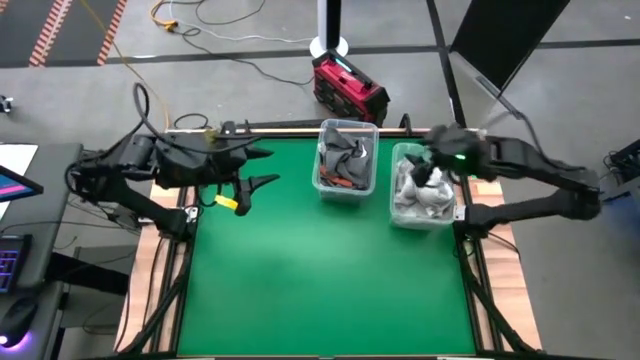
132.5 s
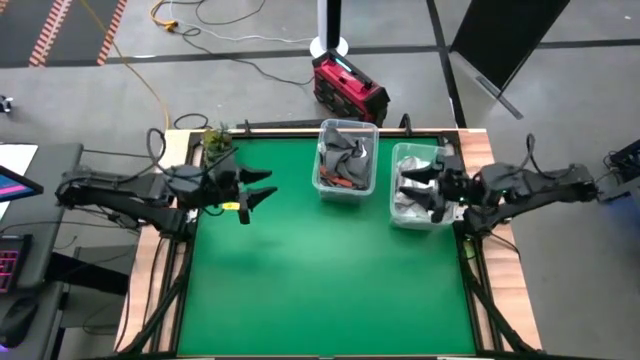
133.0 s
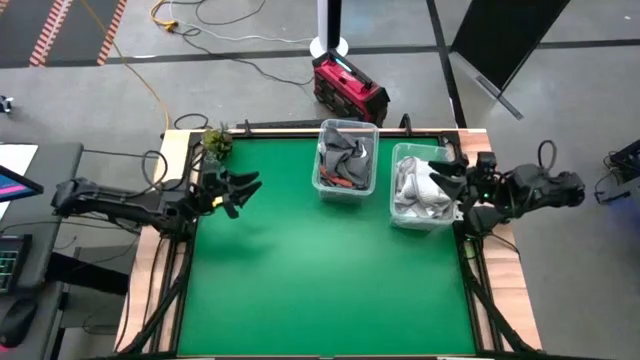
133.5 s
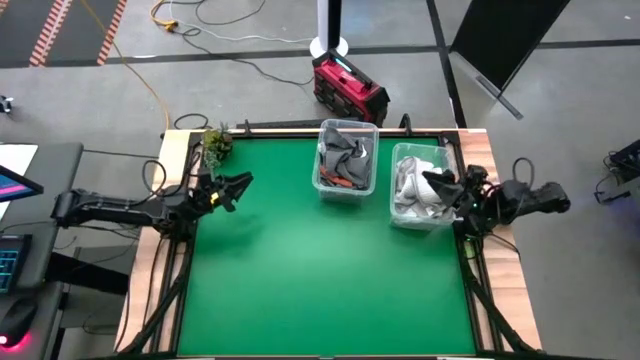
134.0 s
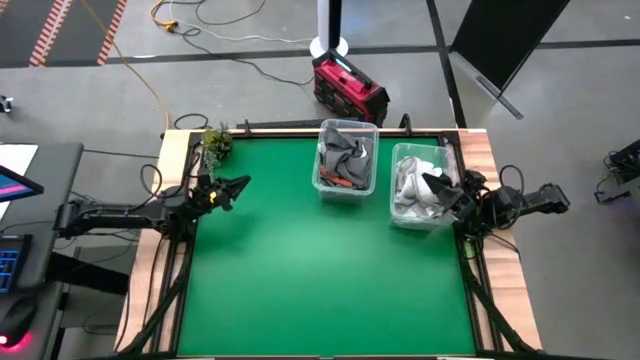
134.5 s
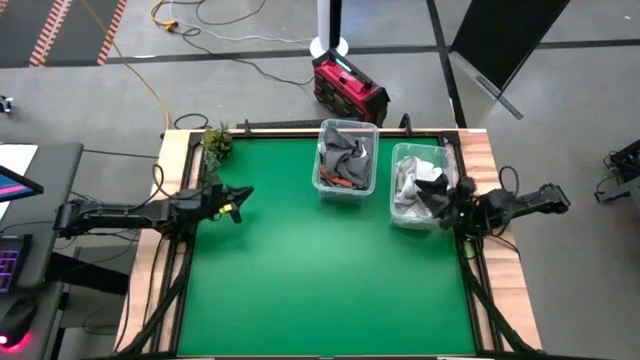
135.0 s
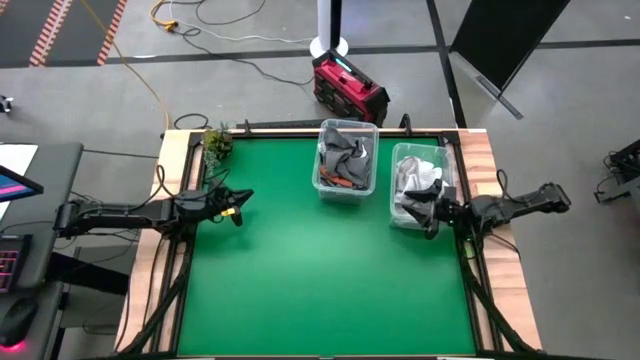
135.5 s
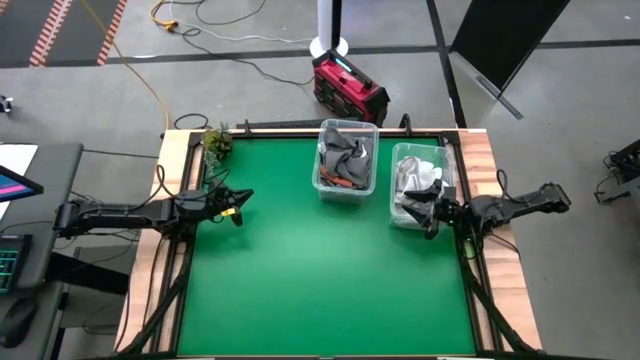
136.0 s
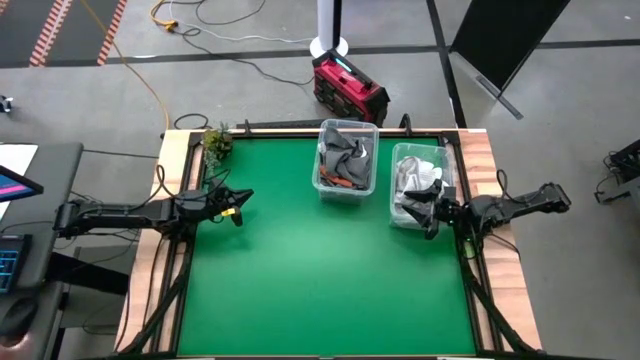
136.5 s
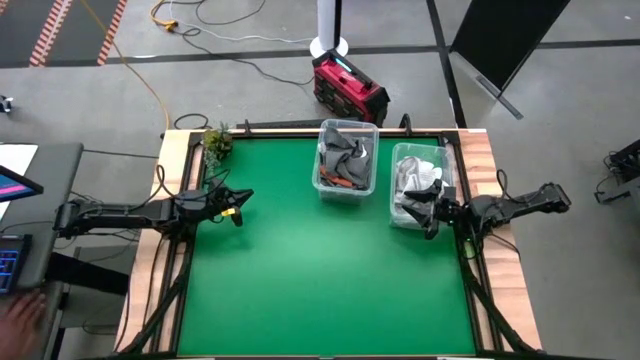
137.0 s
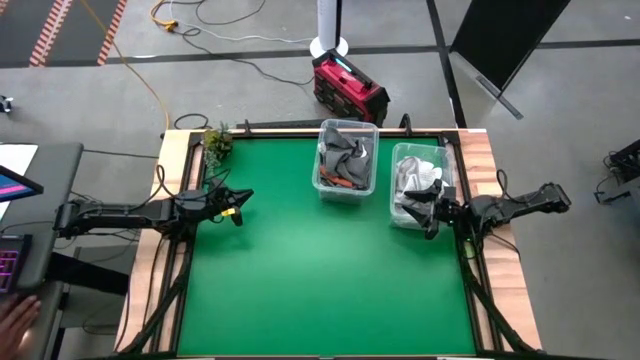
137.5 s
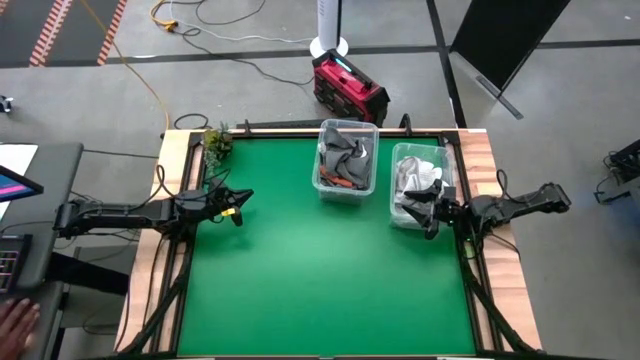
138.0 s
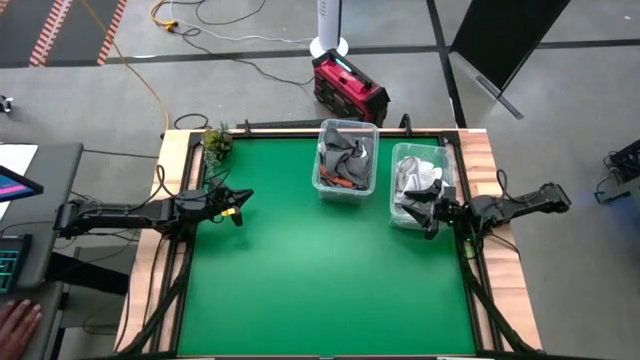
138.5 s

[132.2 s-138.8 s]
Task: Sort towels by color in basket
Return to Home Position

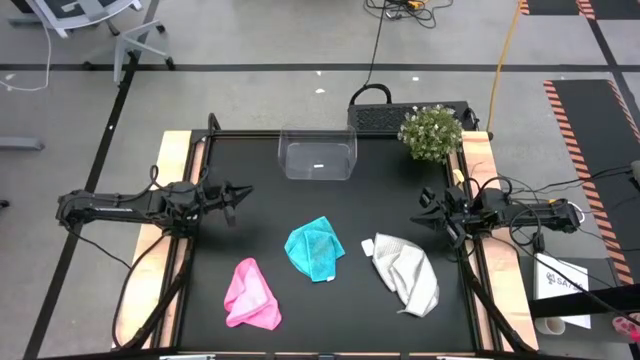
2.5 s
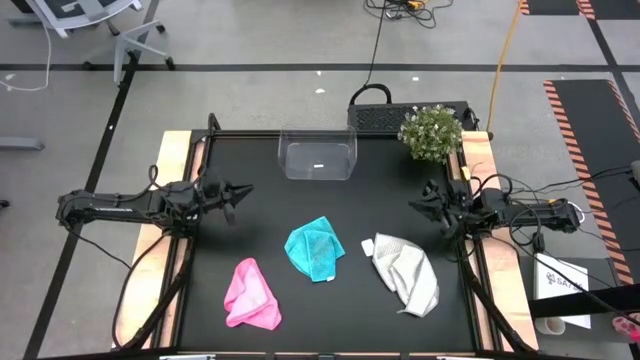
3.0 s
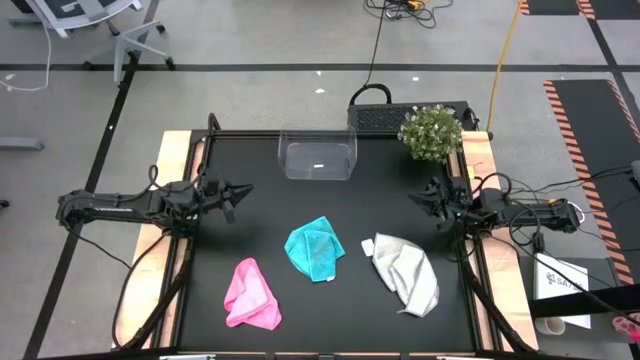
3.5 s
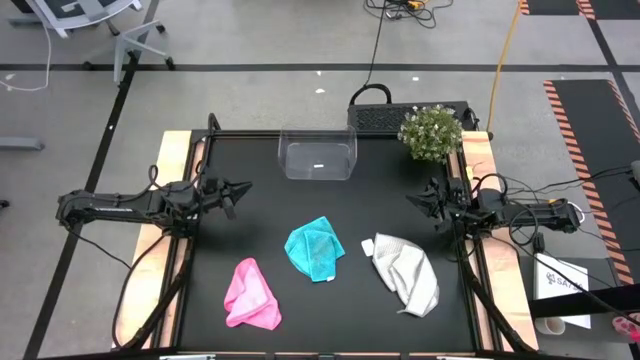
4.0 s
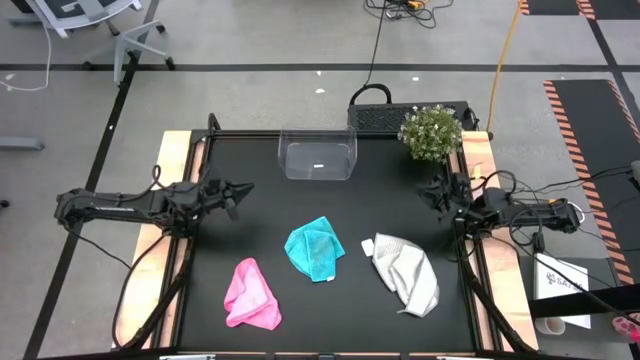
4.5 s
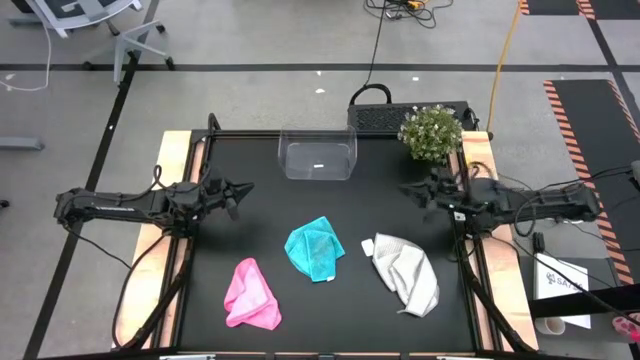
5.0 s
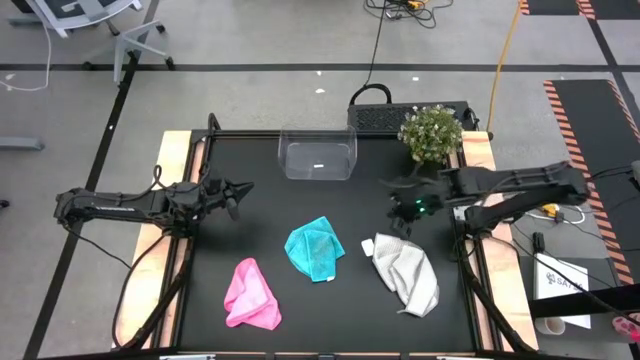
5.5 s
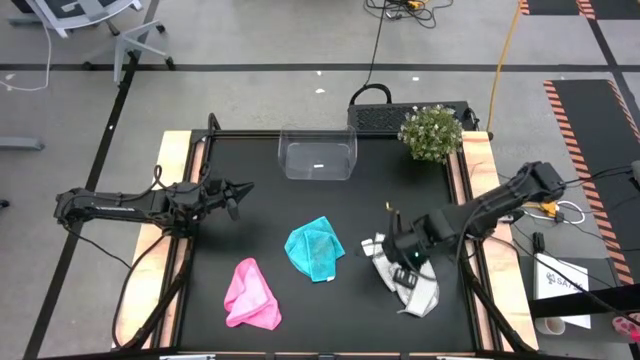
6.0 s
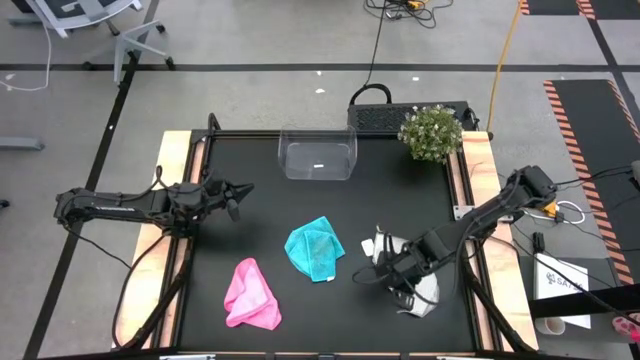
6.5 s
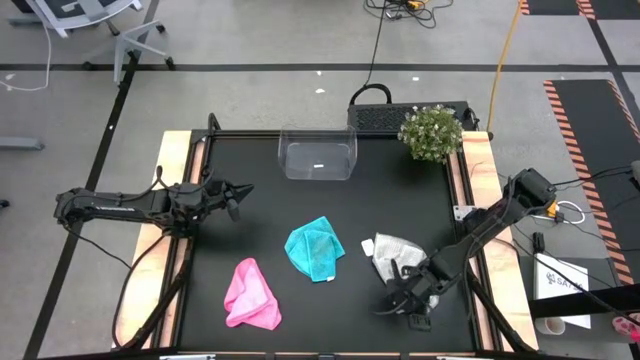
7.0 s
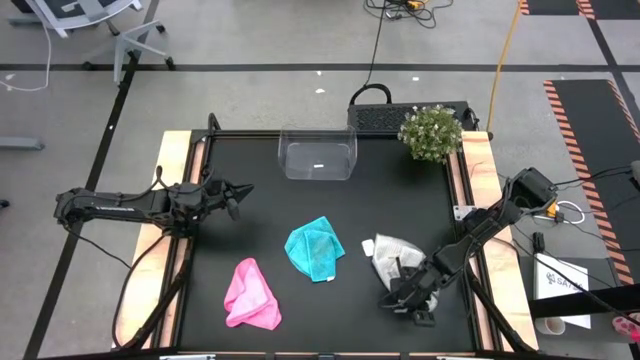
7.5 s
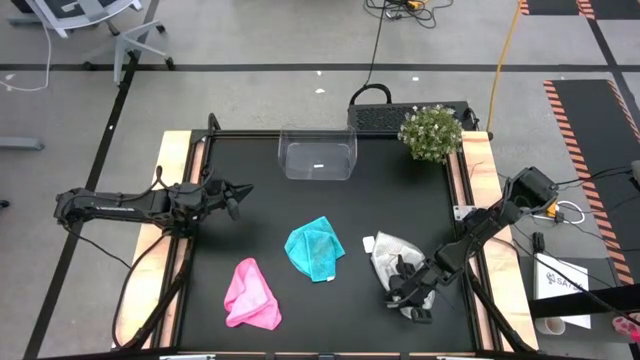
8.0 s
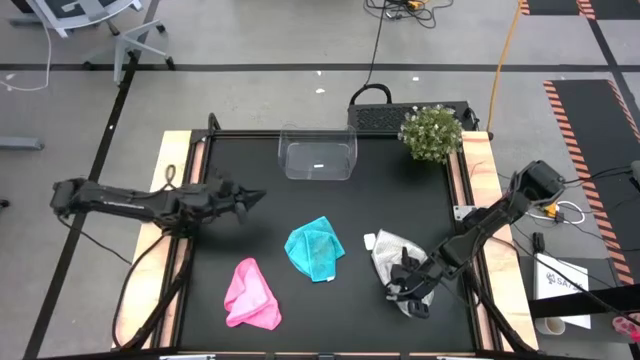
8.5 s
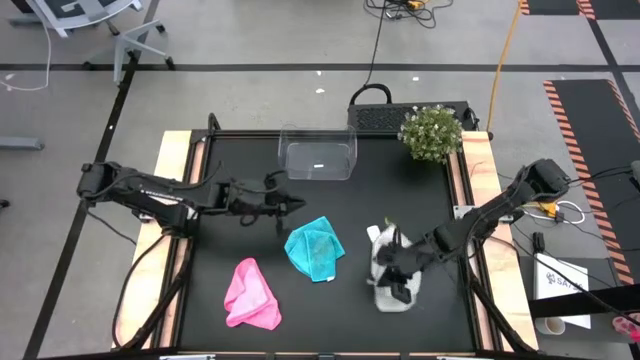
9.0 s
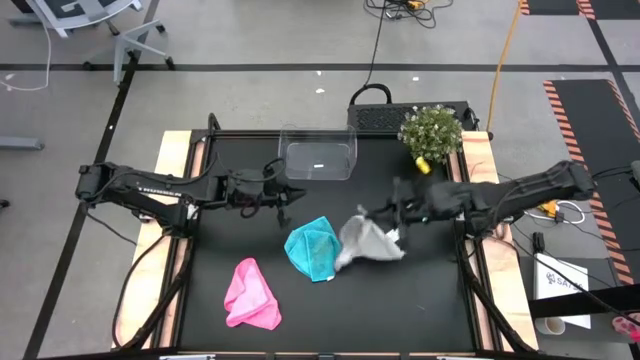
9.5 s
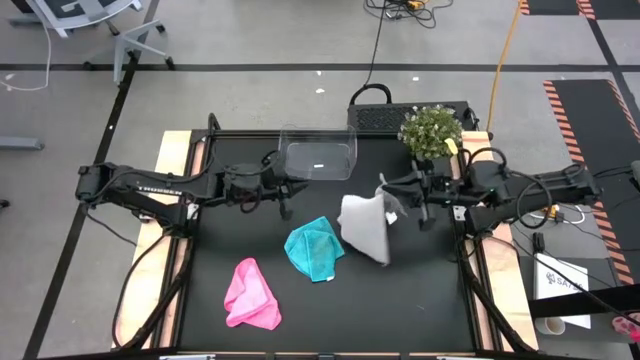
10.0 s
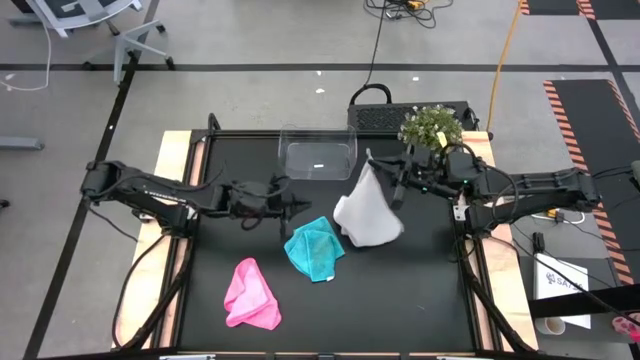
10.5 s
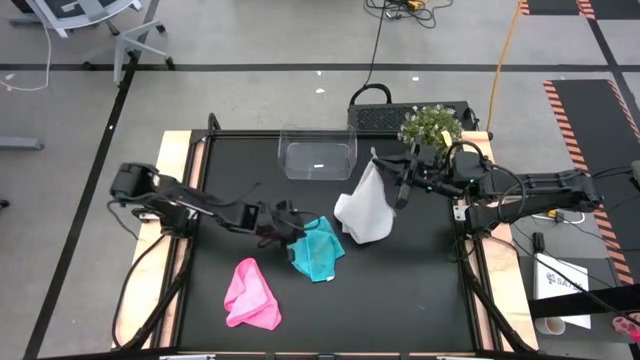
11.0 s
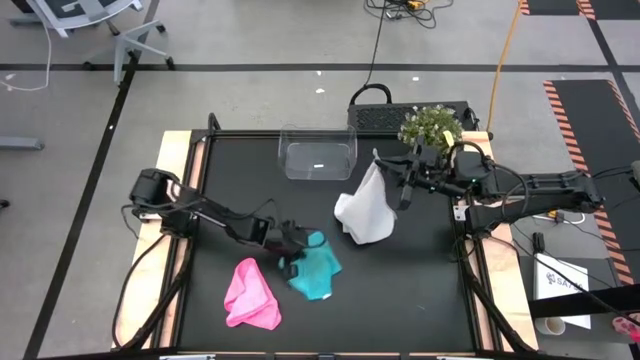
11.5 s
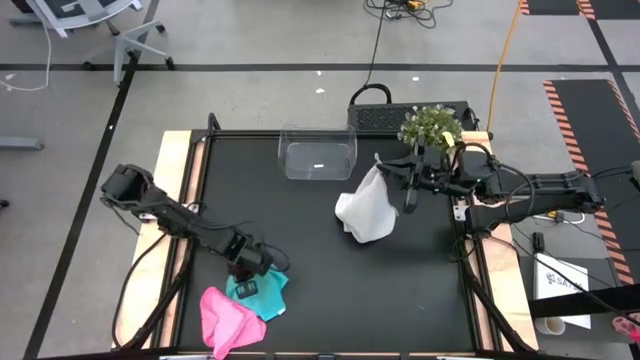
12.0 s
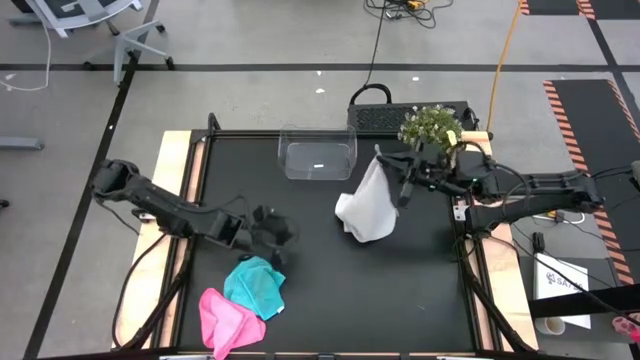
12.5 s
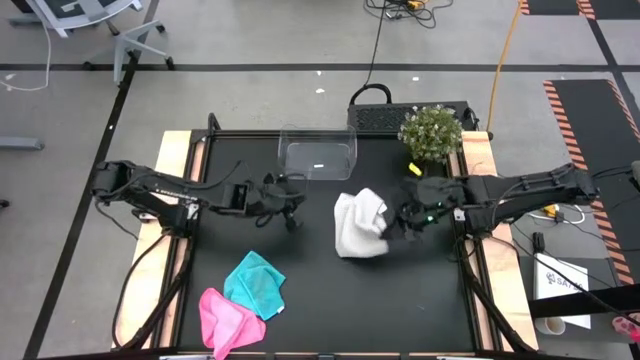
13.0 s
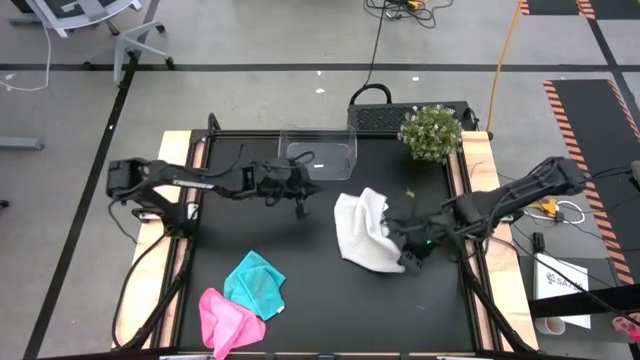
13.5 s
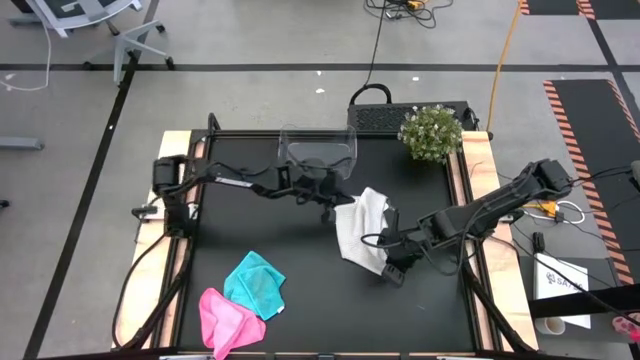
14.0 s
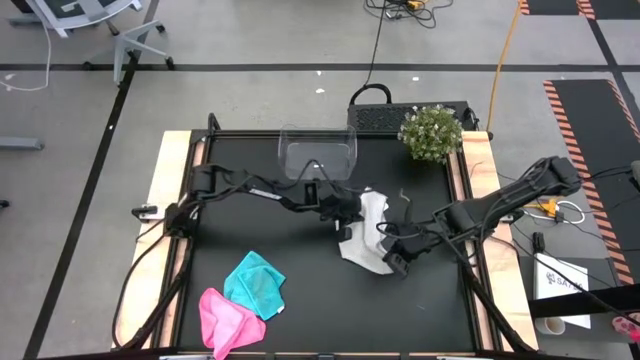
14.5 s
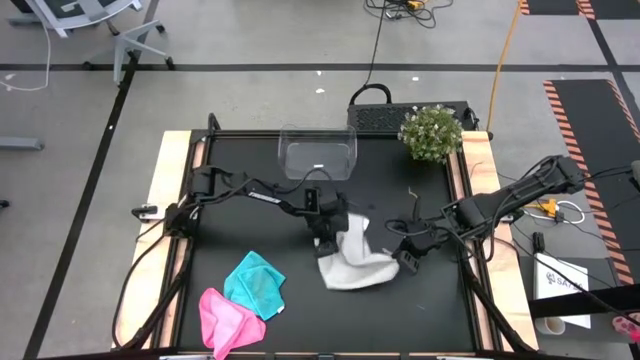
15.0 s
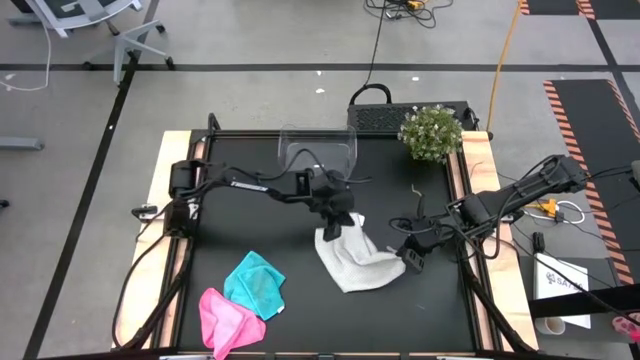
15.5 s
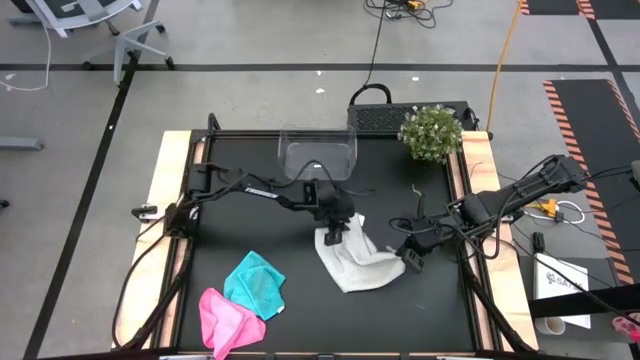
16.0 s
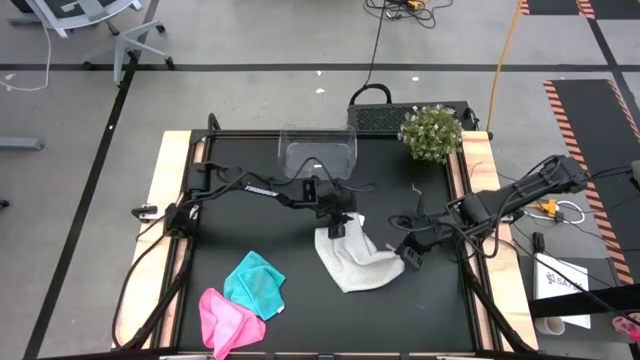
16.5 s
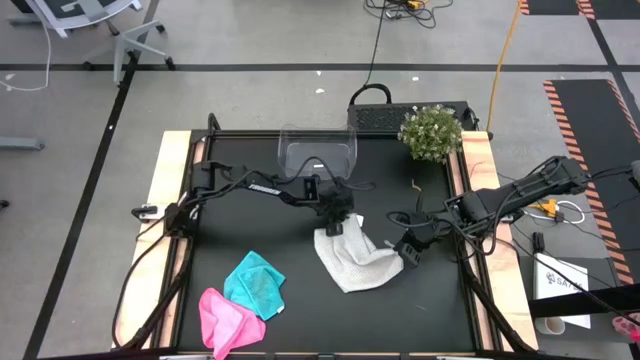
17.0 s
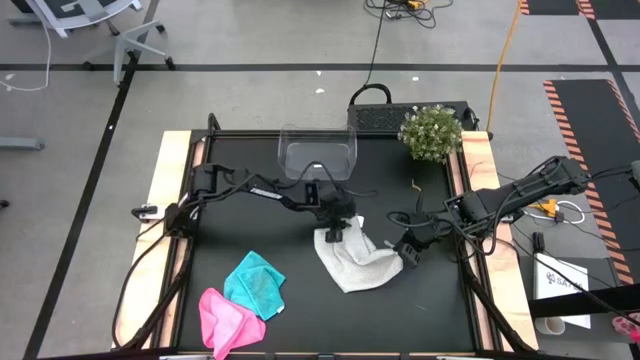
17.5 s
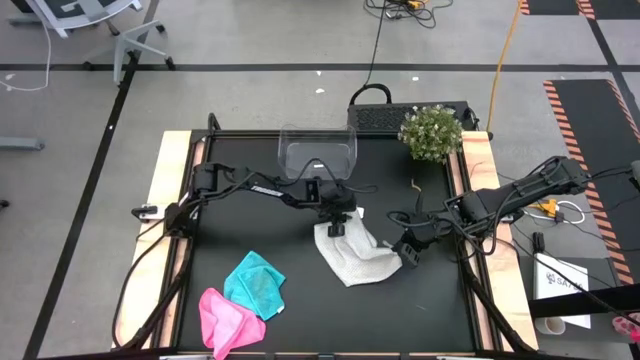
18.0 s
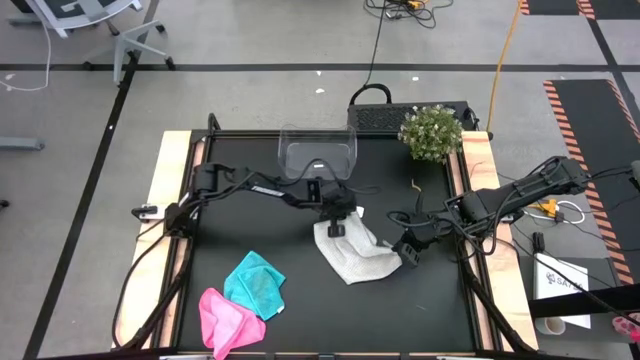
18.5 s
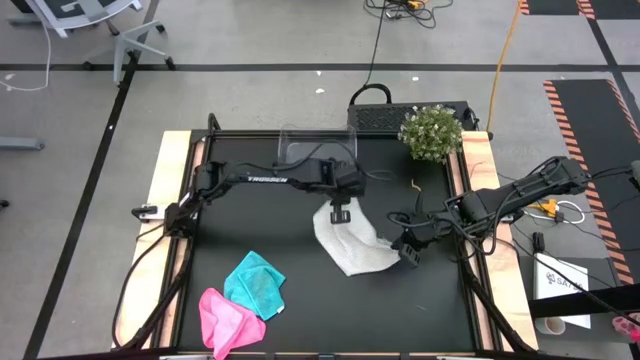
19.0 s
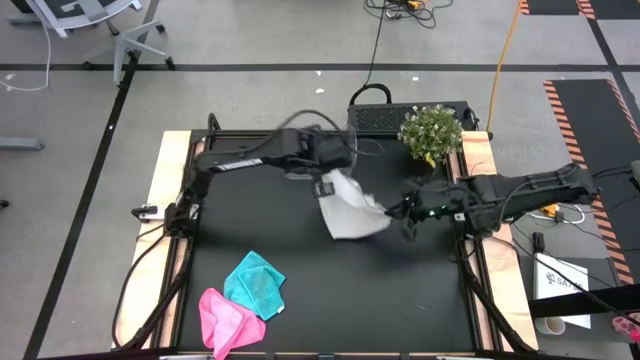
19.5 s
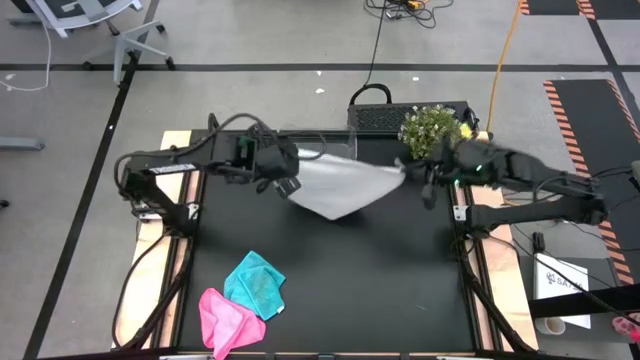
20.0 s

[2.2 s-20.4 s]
Task: Fold microfiber towels
Fold the white microfiber towel
